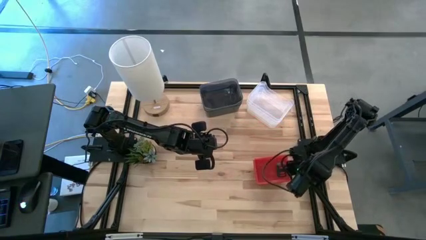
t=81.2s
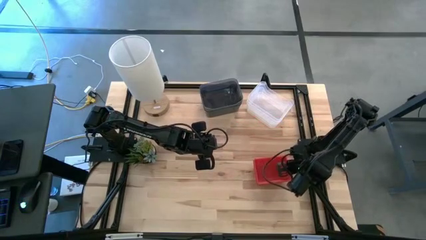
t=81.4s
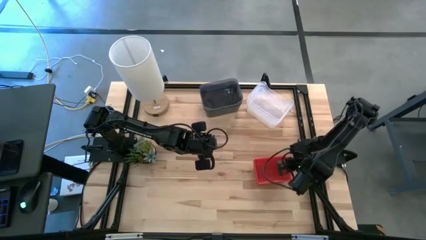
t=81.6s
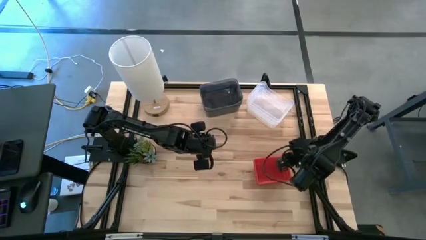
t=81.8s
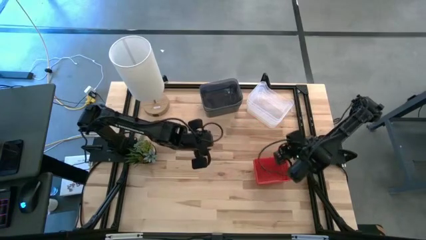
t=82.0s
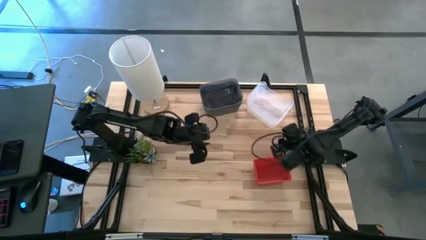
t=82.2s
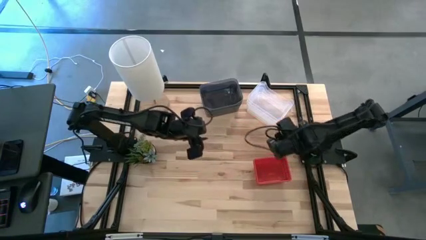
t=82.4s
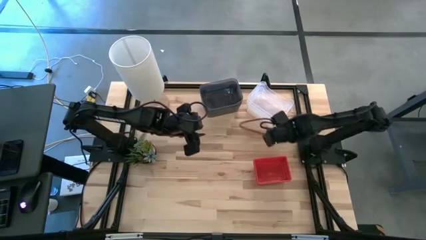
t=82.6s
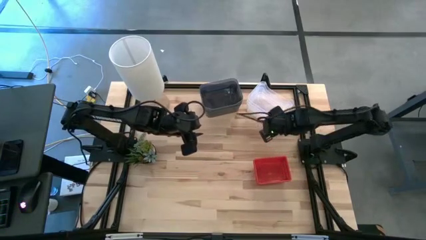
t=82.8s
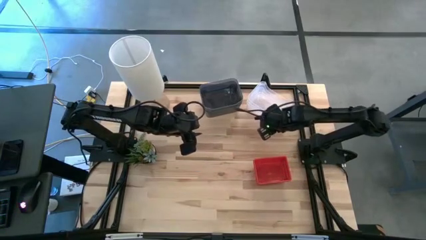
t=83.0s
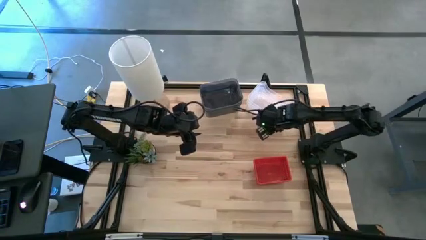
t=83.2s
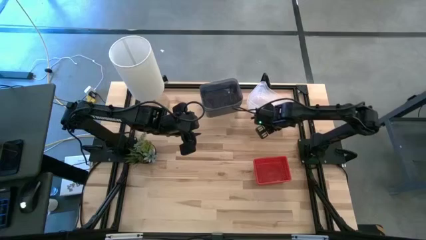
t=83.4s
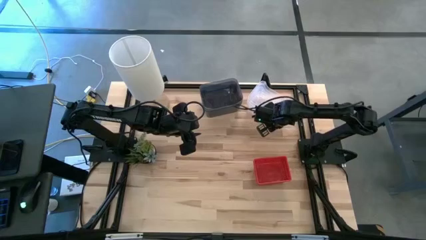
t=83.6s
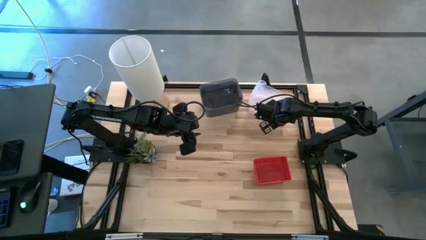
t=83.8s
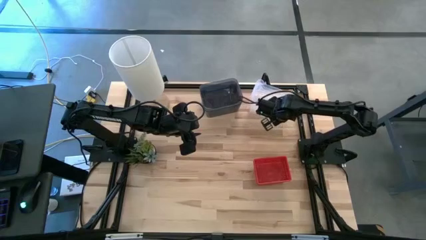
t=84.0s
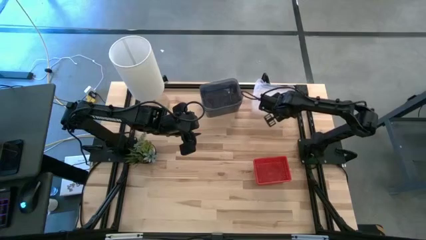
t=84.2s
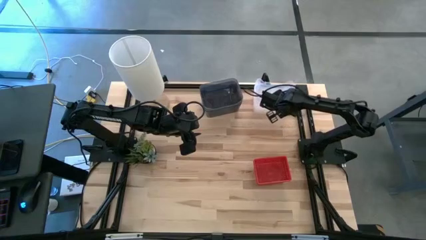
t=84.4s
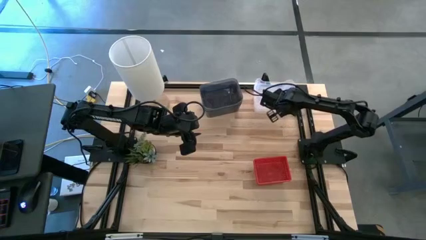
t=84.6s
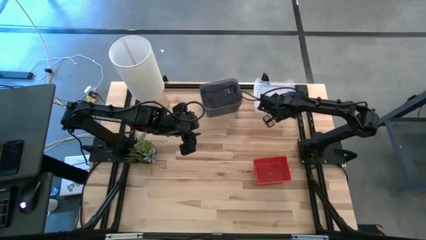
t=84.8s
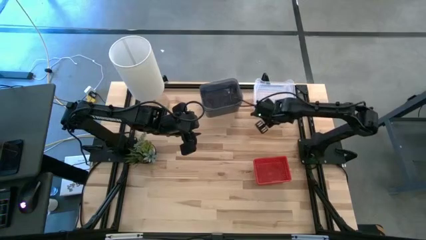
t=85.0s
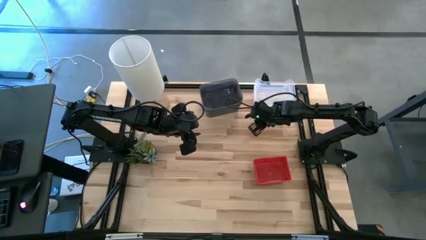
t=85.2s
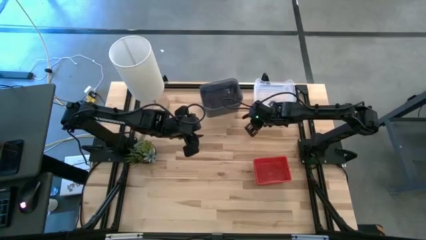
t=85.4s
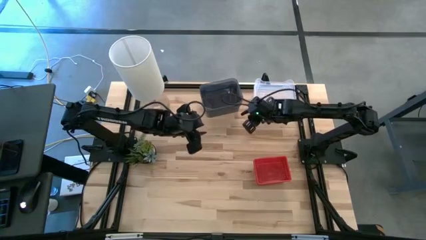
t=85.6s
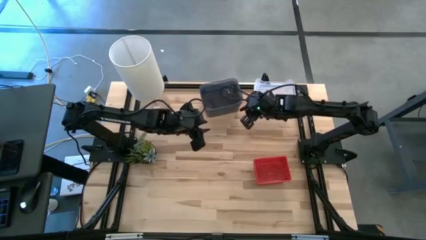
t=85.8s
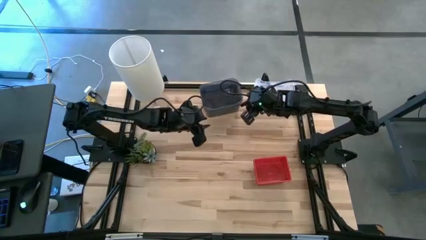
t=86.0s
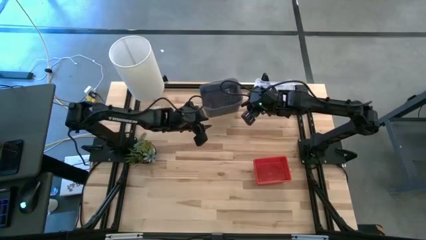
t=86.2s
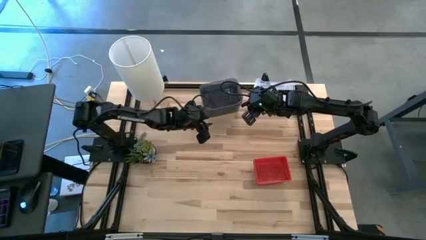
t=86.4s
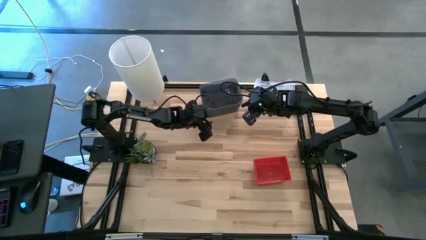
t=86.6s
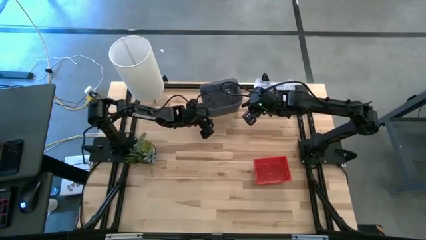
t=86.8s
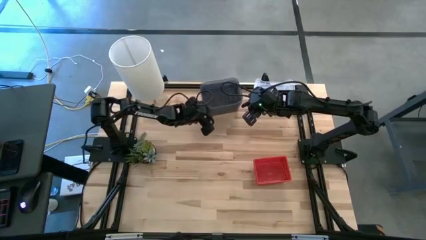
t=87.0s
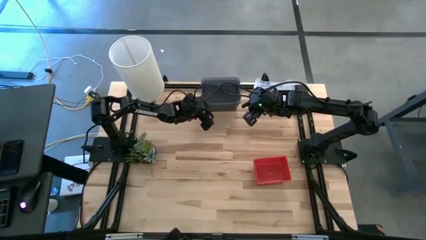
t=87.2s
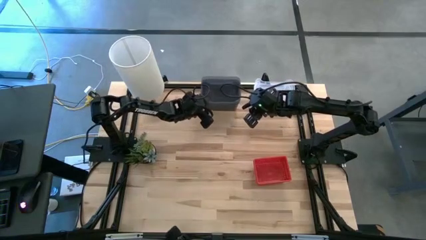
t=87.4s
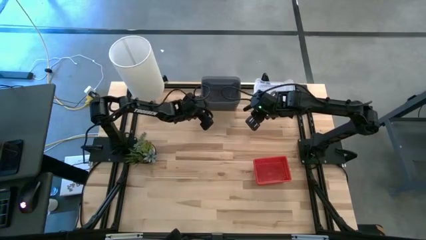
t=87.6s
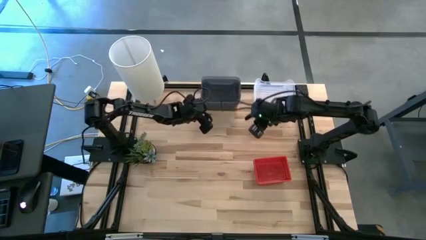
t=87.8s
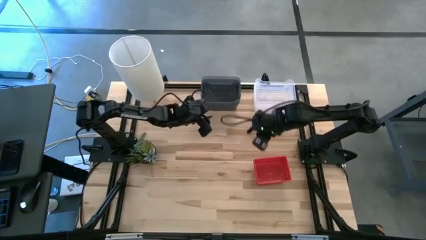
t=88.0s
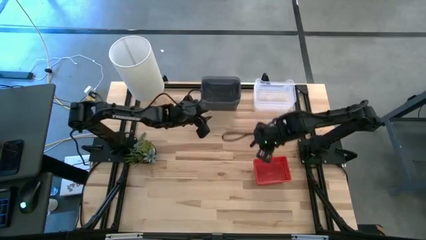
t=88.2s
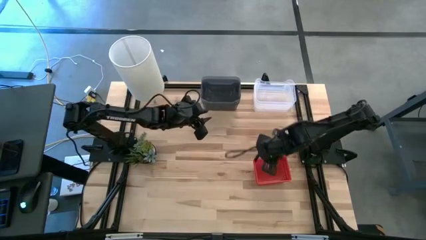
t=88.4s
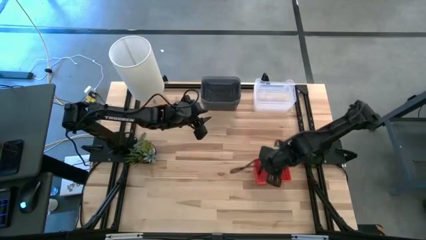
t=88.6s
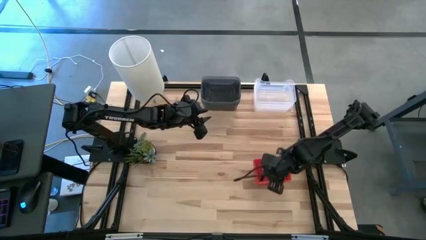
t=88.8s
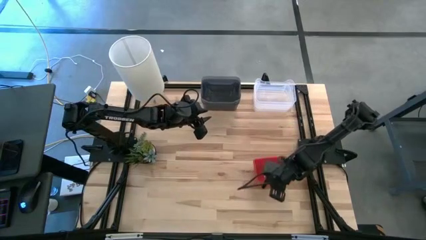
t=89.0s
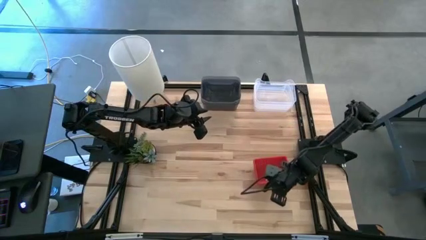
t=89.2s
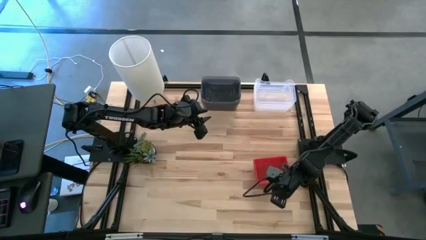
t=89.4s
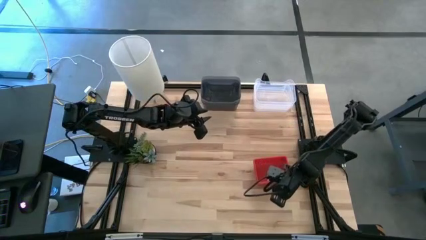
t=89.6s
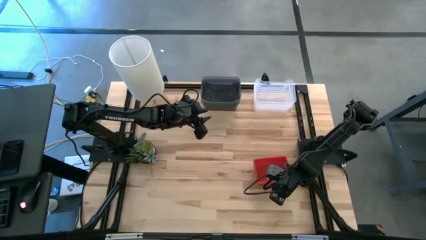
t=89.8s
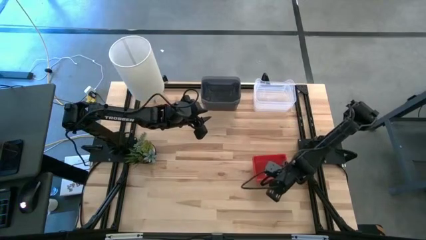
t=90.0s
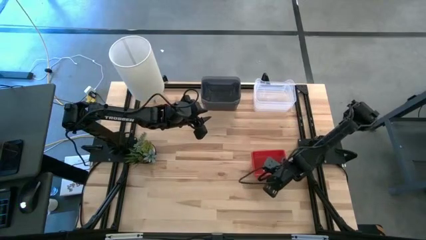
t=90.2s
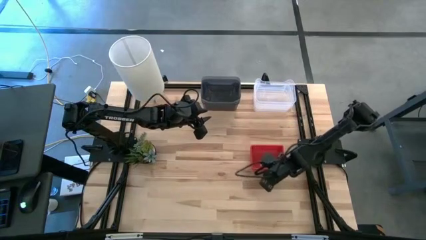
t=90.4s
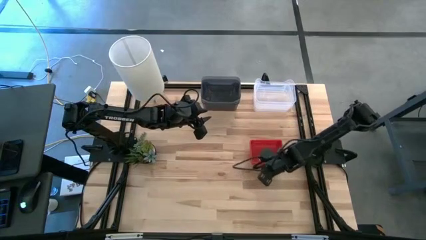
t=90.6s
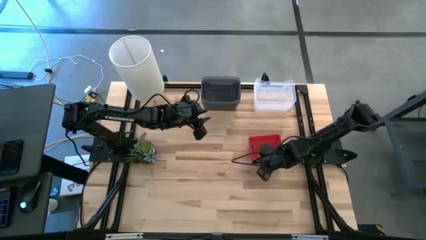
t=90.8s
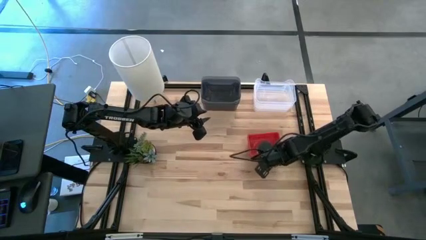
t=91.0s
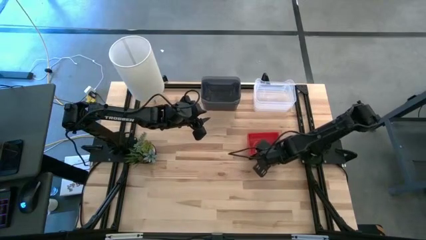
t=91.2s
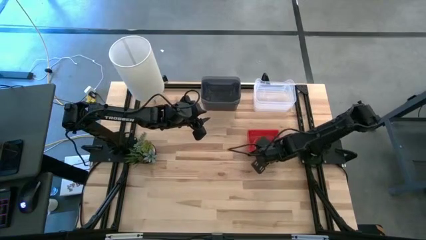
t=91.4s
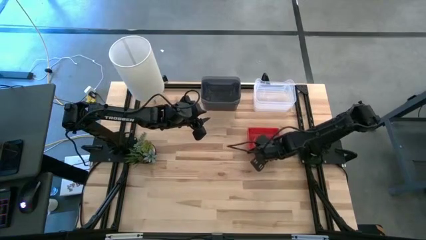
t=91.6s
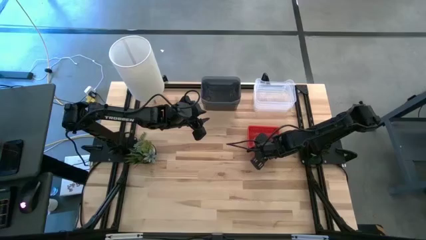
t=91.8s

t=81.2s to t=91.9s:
Adjust the stacked bins

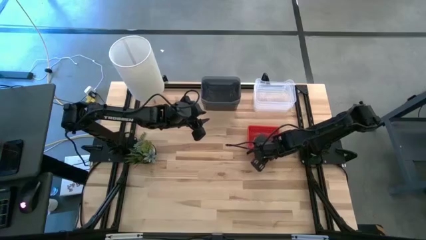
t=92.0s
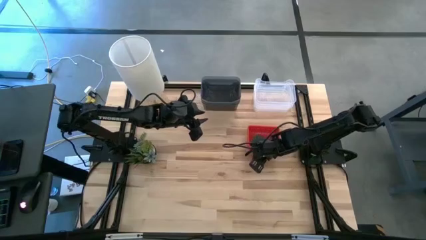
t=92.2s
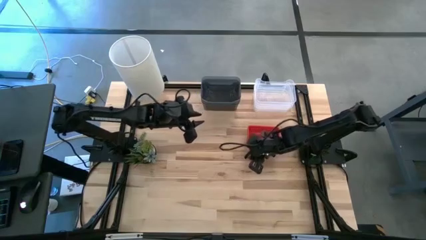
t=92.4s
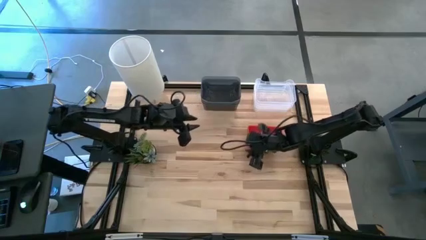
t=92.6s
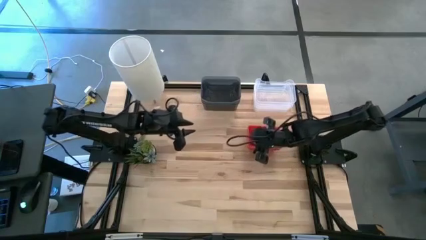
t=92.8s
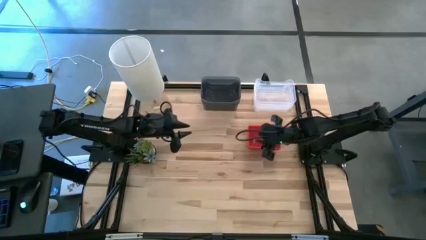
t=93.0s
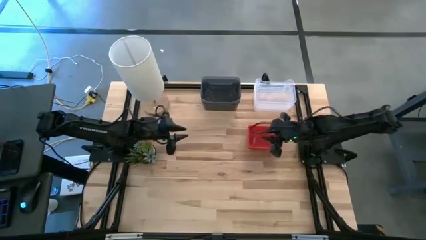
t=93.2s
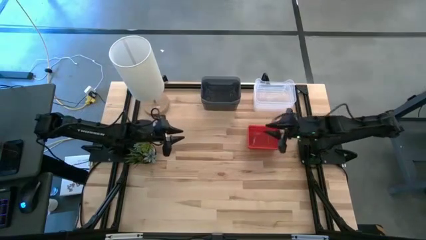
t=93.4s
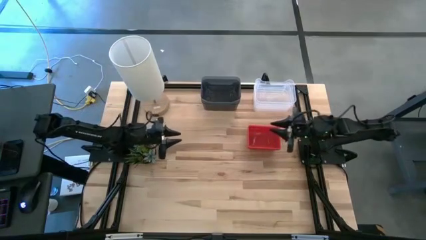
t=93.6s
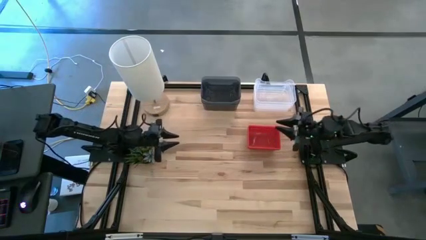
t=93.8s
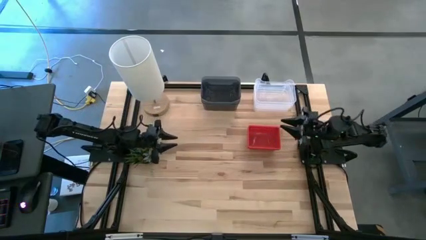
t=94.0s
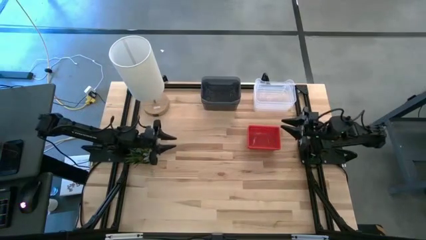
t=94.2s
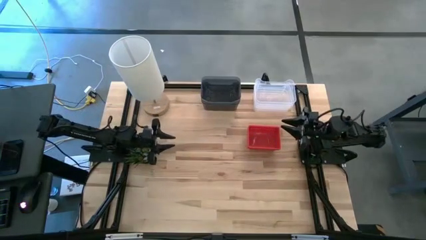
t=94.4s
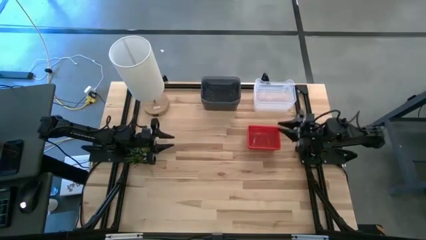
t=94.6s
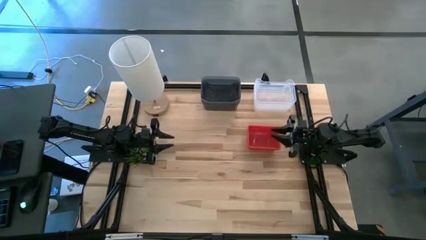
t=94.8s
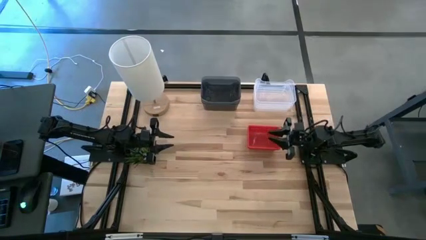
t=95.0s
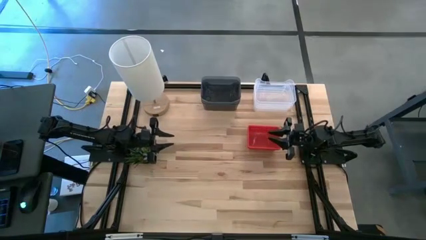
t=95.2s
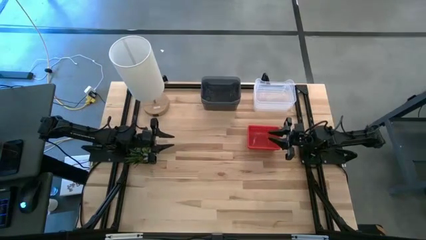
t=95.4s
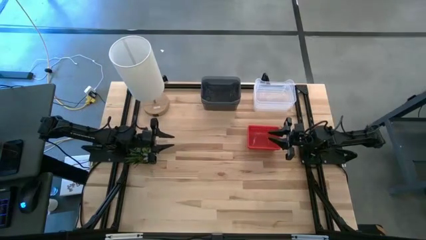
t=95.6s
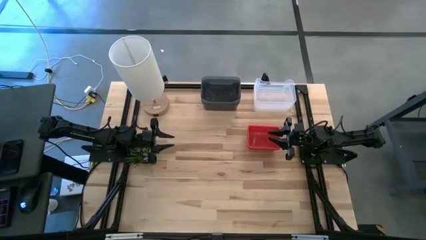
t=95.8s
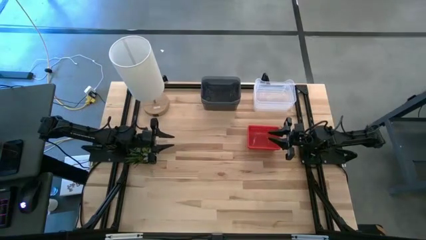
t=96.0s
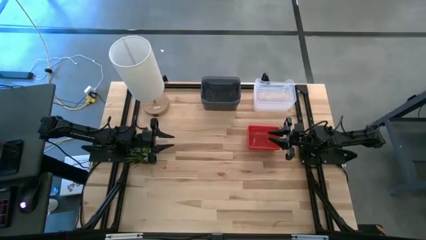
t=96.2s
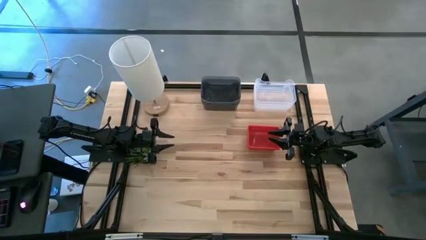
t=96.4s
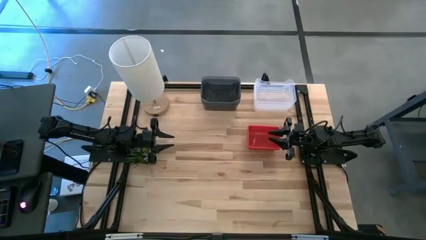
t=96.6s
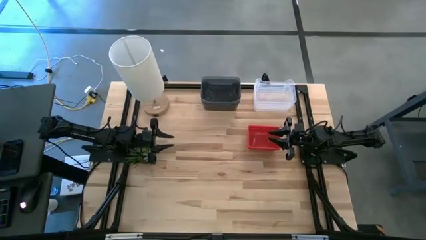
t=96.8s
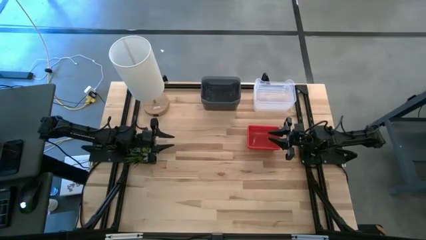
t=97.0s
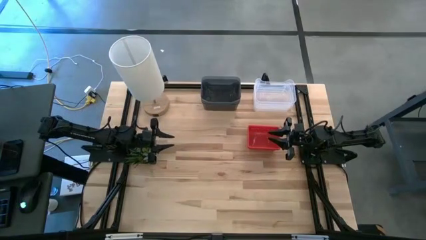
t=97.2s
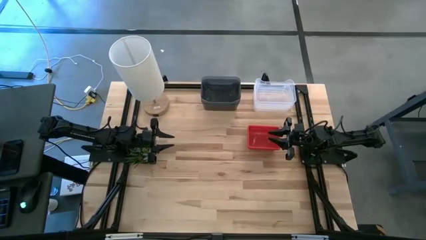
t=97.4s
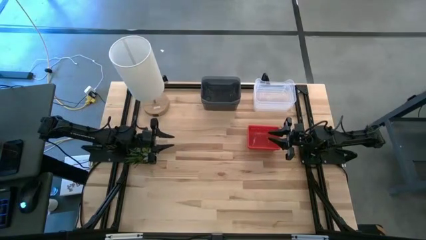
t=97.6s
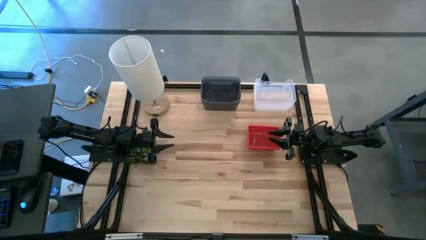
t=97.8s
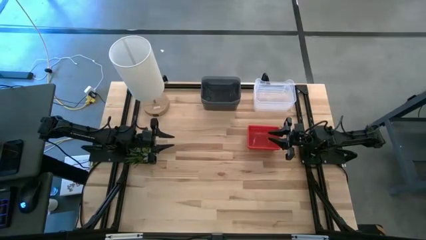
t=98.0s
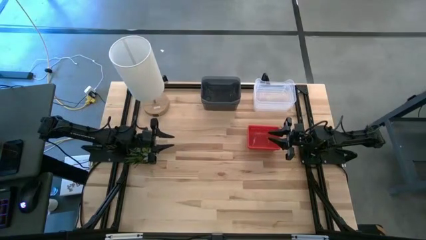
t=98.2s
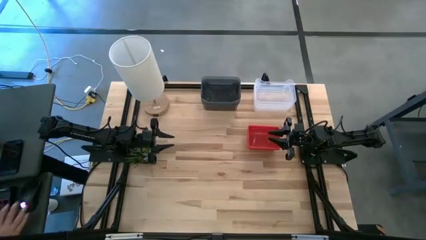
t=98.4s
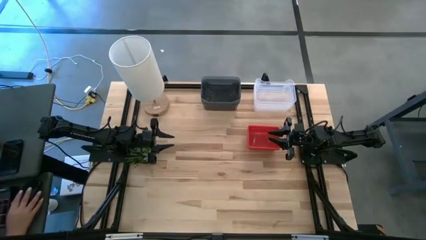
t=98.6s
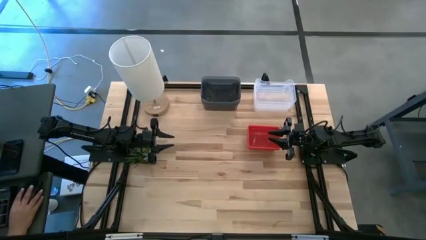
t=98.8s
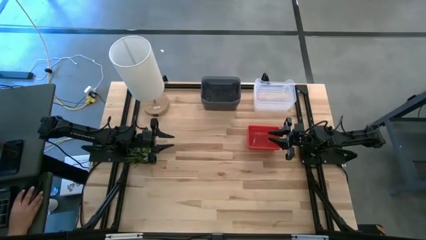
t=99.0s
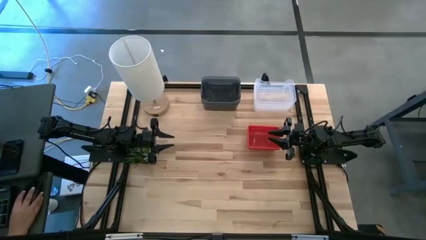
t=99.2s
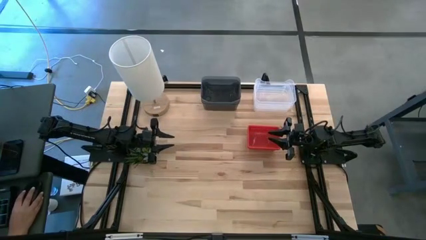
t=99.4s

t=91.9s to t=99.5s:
Return to Home Position
